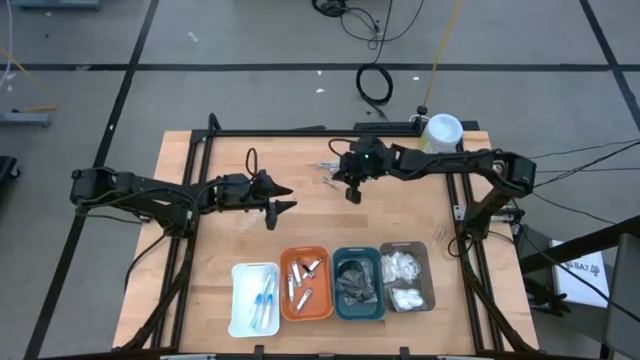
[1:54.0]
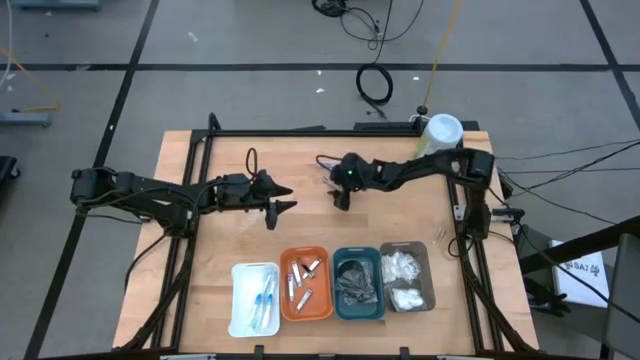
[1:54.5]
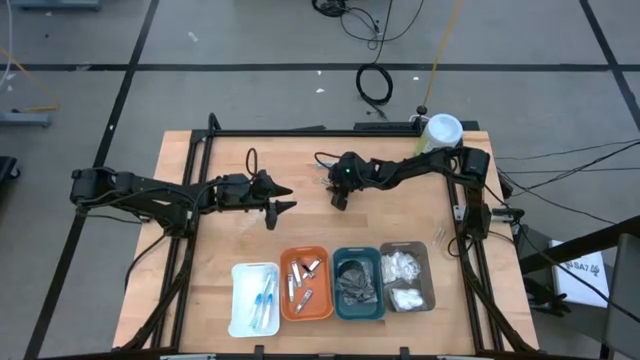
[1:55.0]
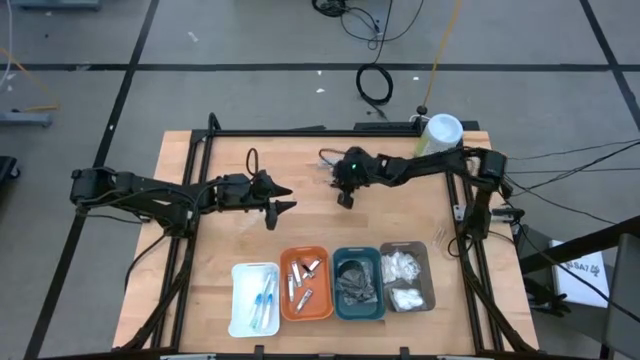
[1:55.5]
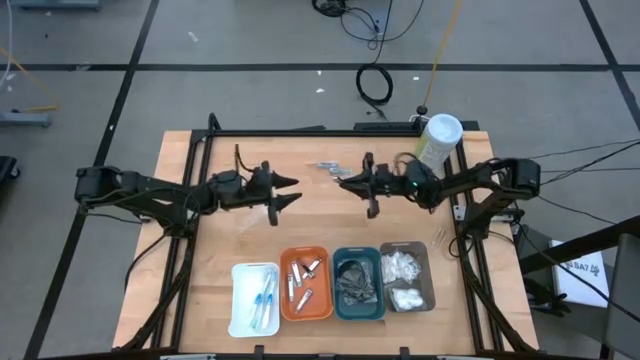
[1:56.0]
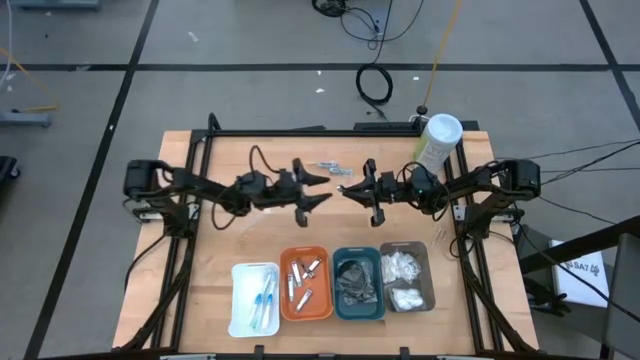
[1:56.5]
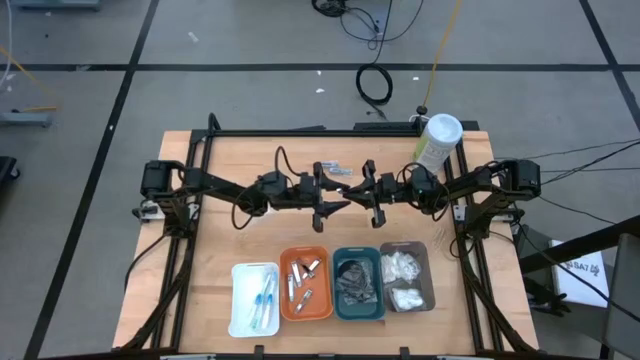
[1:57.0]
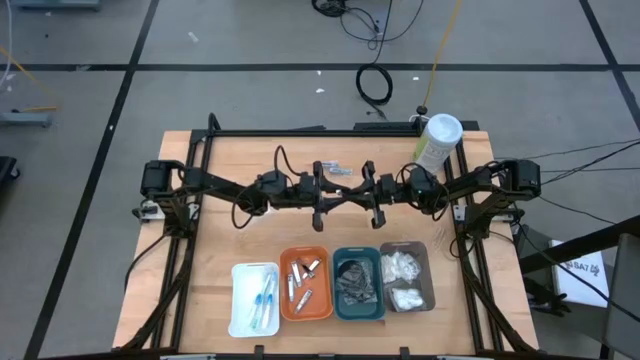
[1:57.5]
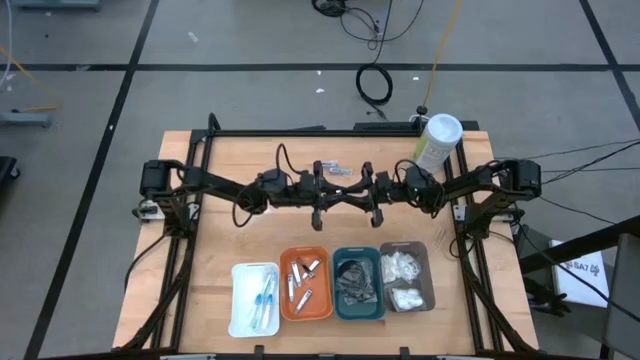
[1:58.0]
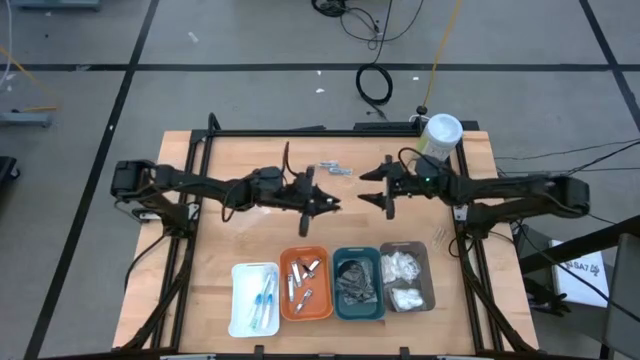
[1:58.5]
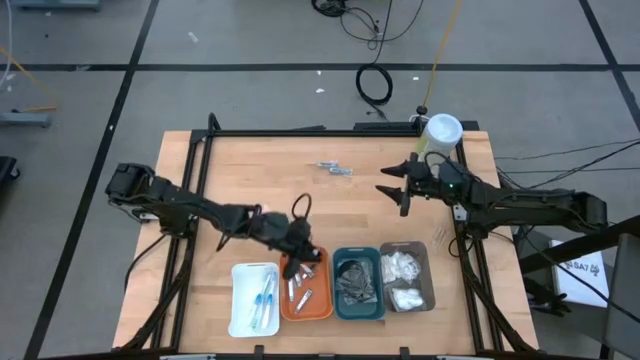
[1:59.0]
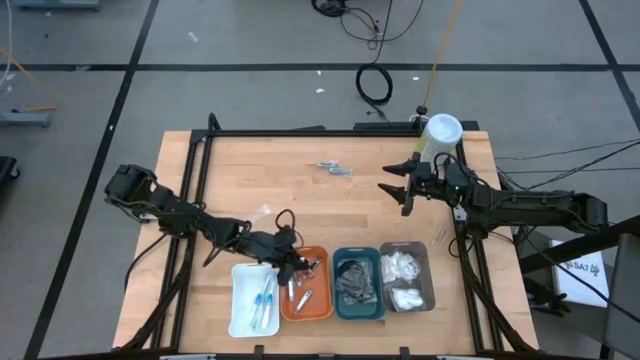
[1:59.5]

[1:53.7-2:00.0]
Task: Pick & Place Travel size toiletries
Put the silver nail cutter into the orange bin

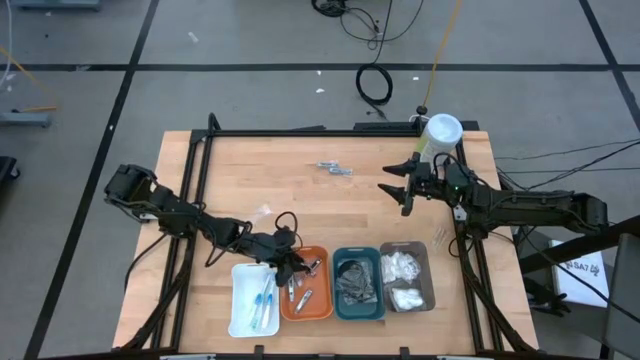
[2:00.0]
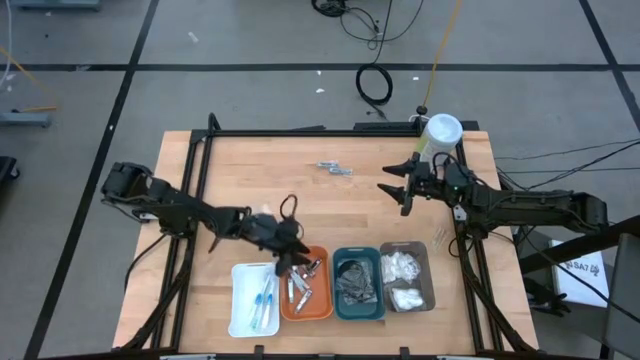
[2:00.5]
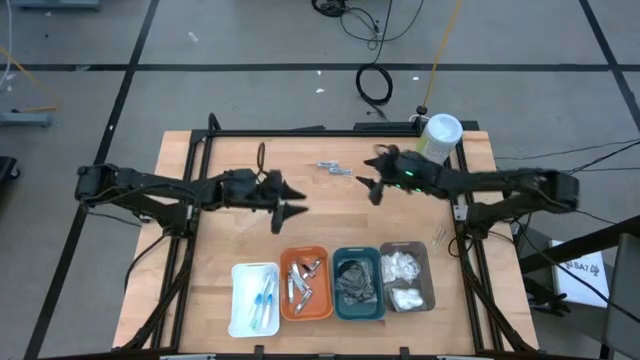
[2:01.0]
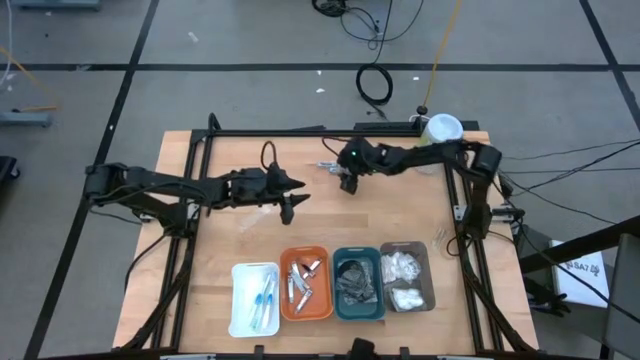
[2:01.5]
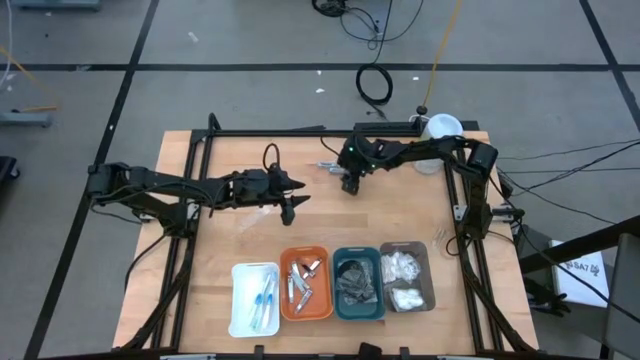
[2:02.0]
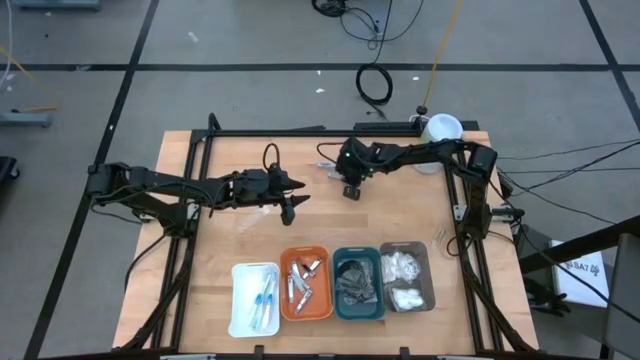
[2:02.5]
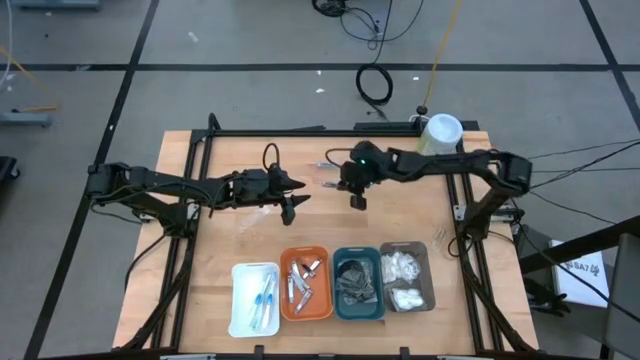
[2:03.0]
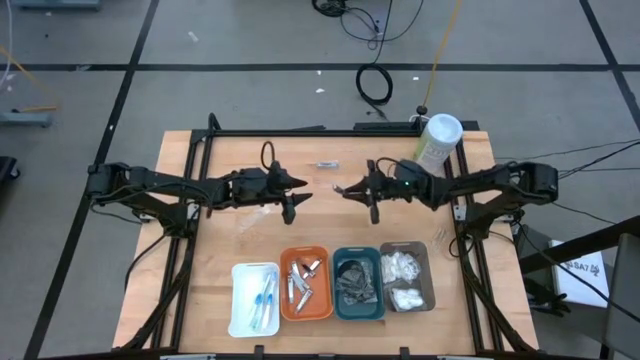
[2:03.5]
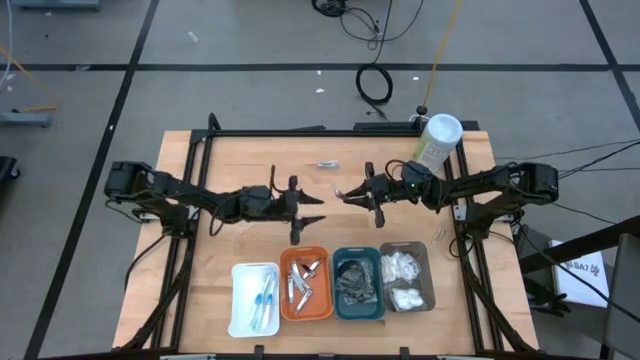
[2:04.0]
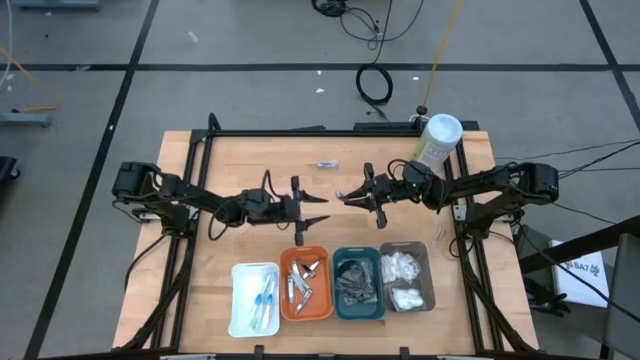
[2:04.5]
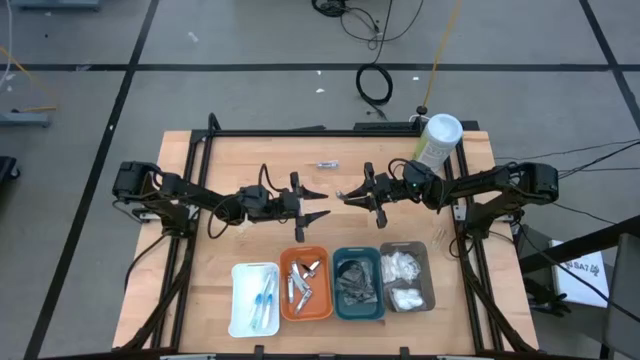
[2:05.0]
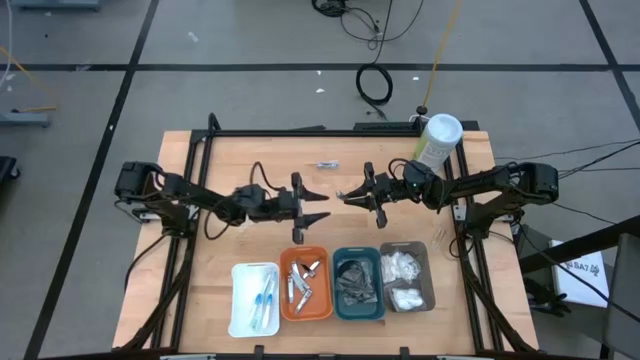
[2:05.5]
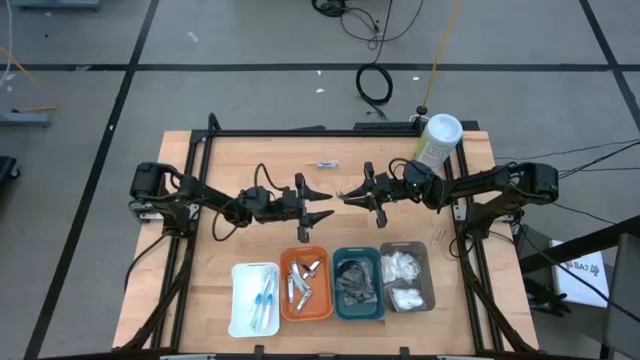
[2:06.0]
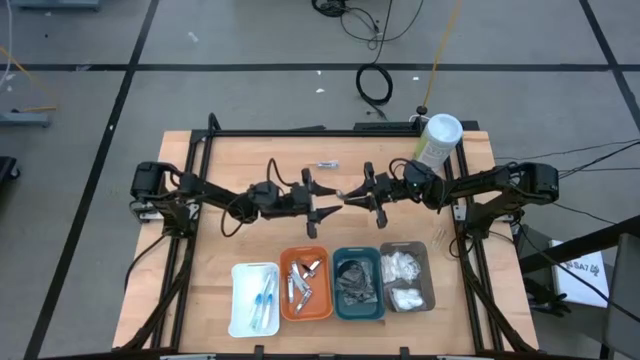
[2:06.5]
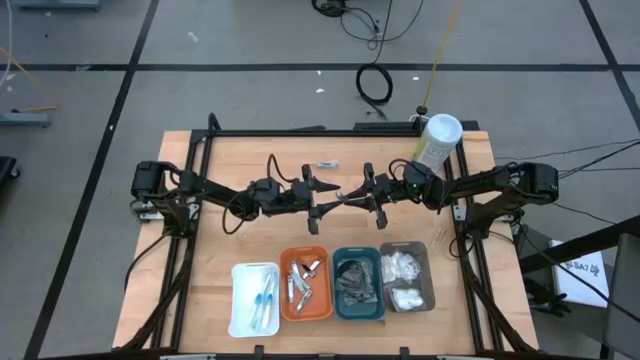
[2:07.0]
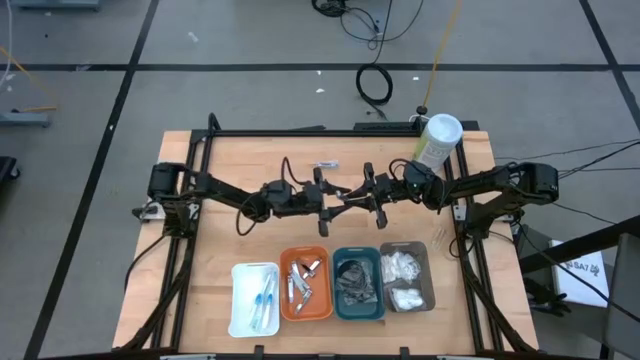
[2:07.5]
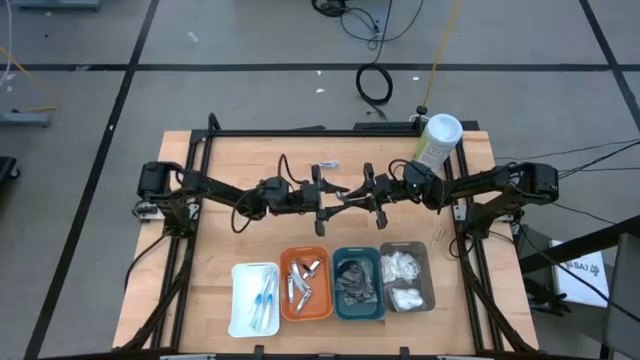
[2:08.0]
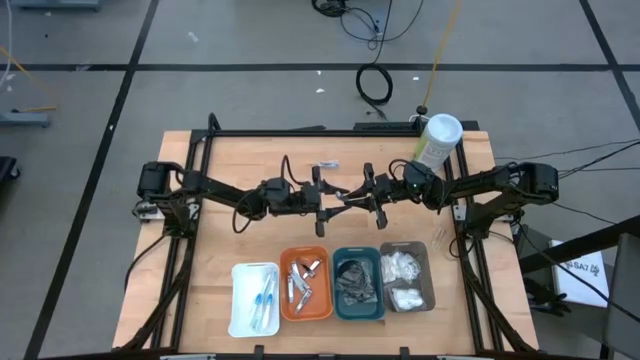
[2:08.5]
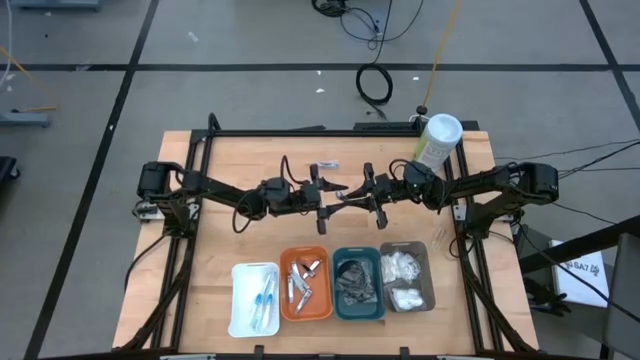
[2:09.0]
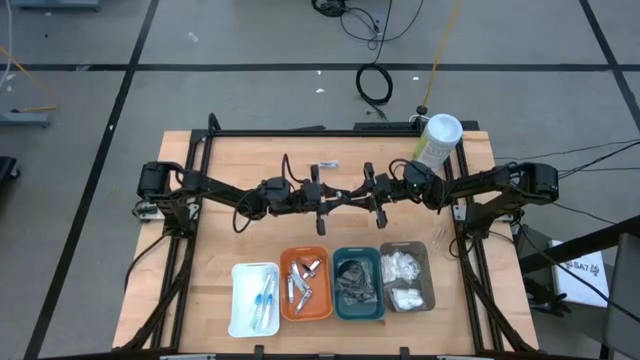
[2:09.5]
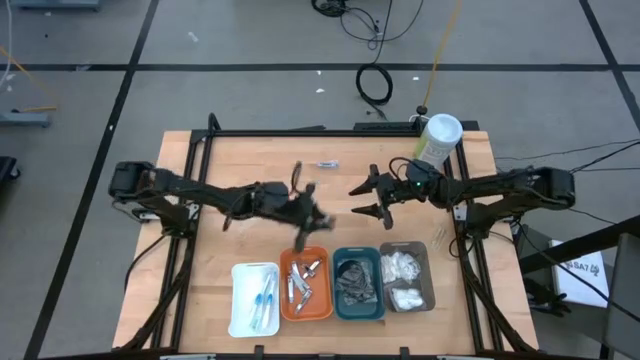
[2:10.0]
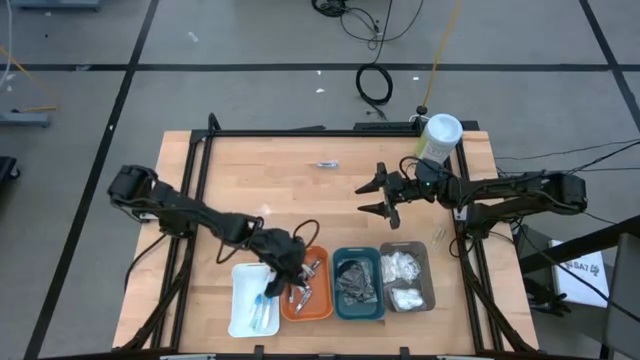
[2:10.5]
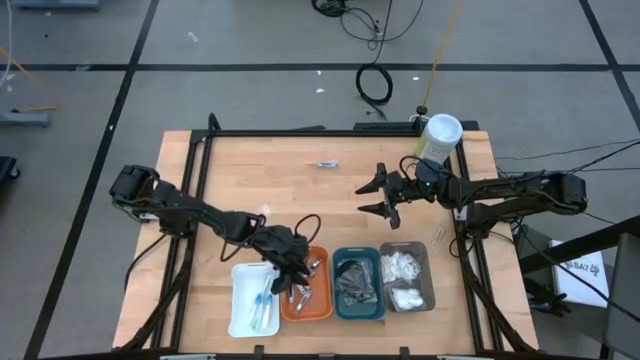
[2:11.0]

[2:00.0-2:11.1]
Put the silver nail cutter into the orange bin

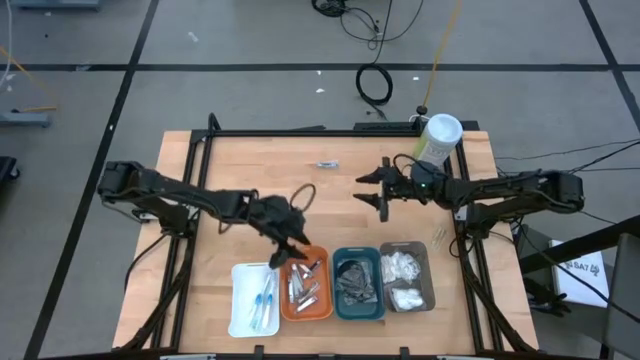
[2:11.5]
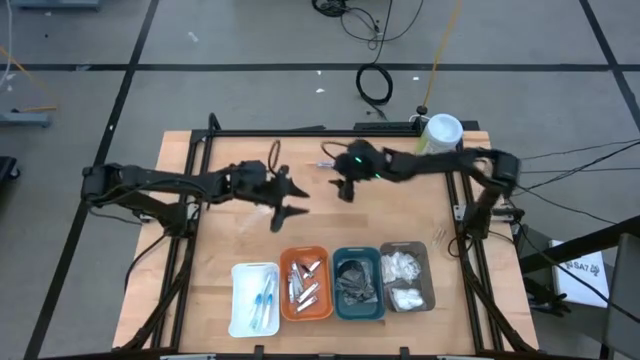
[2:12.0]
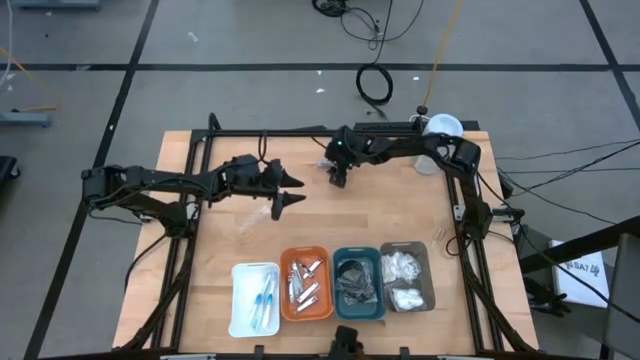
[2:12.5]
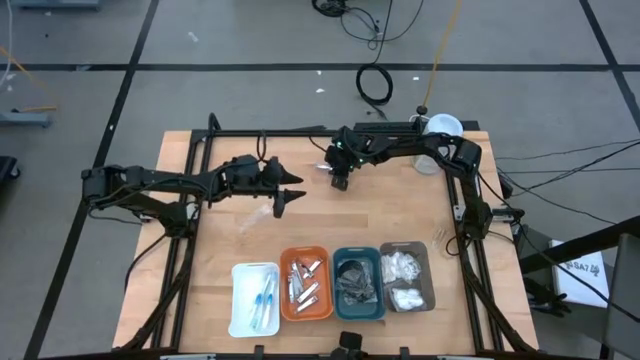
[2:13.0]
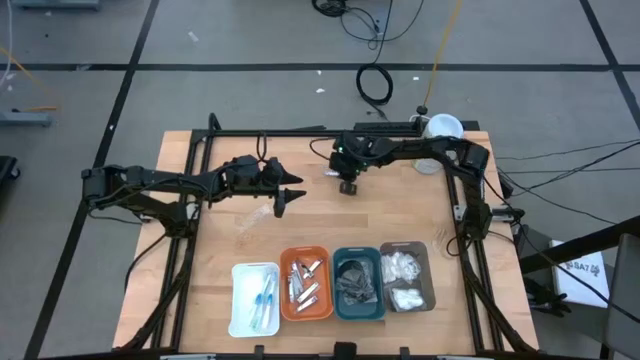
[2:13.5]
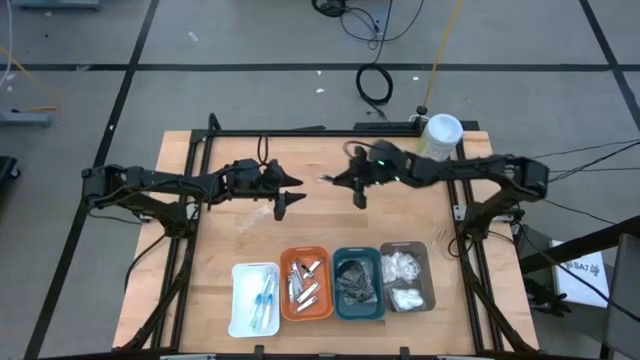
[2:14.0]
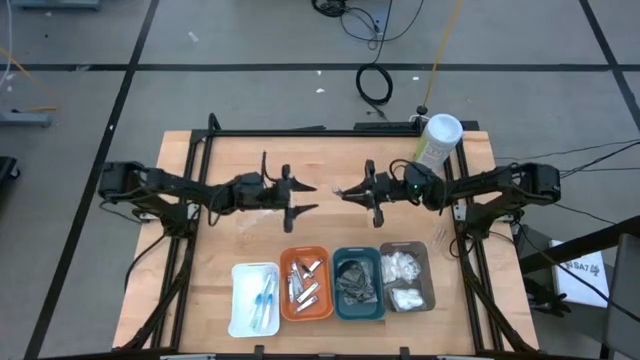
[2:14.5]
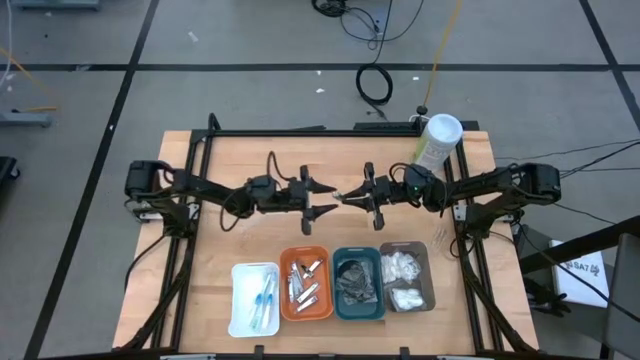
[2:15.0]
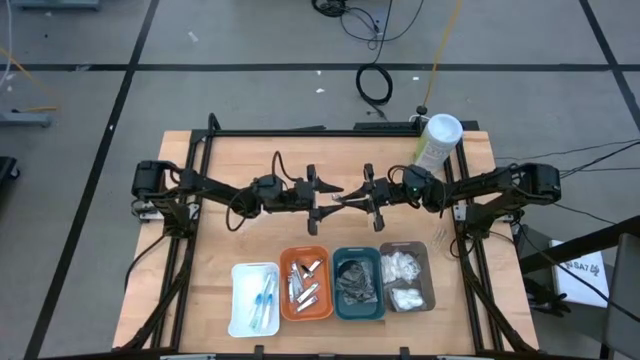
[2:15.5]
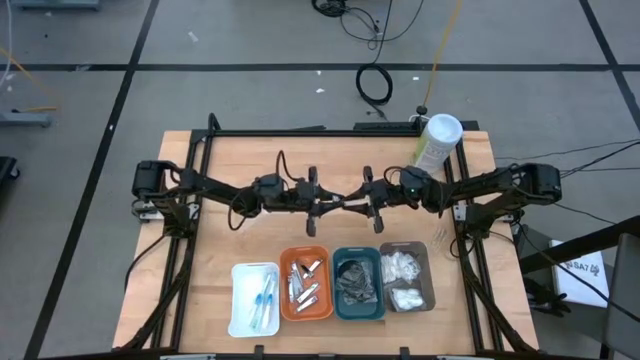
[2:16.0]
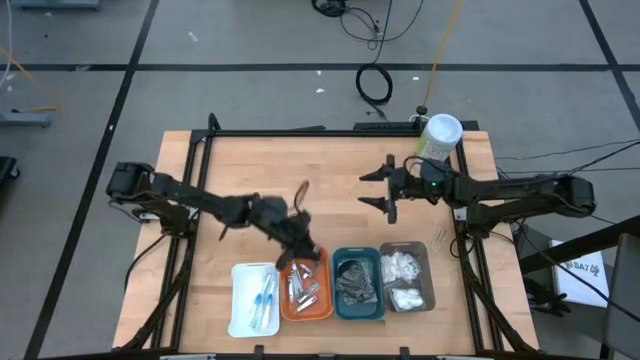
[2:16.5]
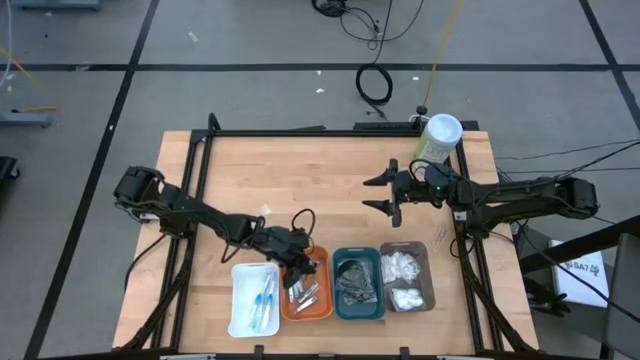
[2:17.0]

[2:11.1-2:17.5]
Put the silver nail cutter into the orange bin
